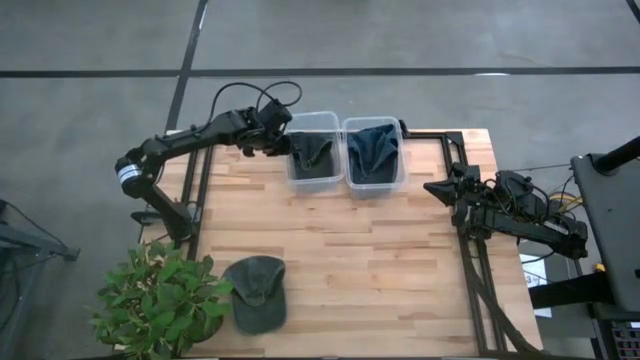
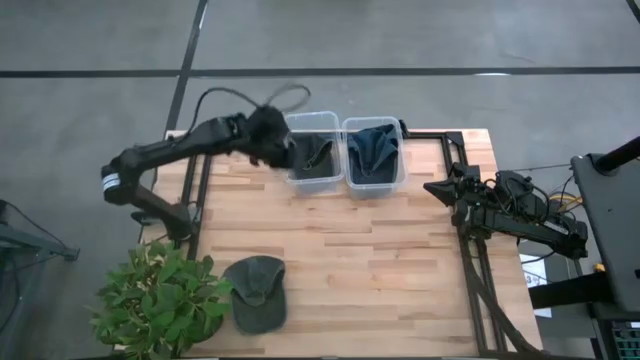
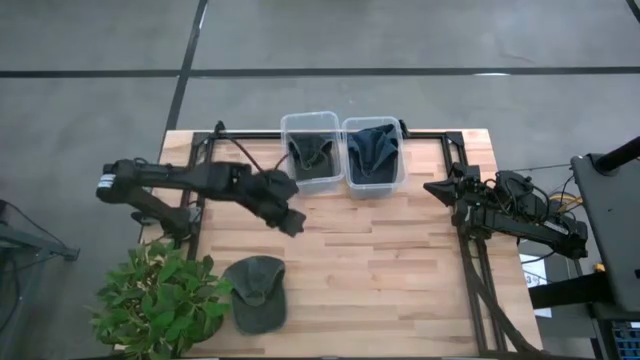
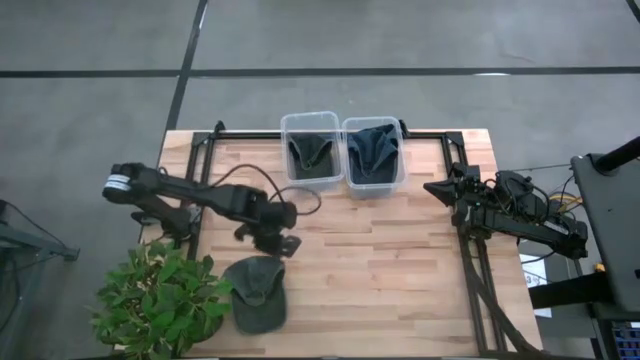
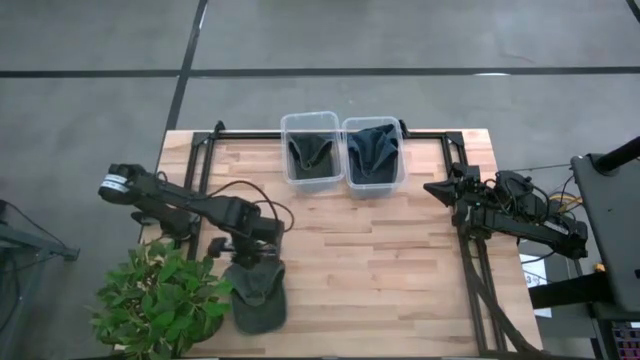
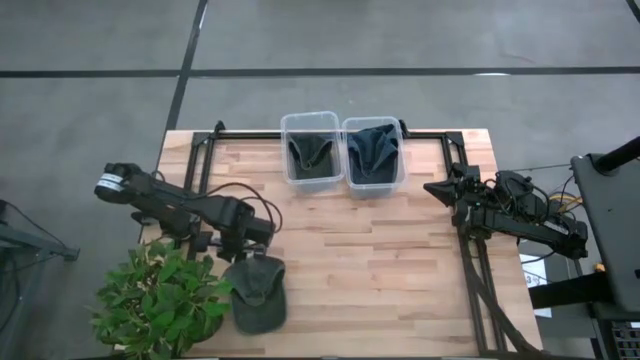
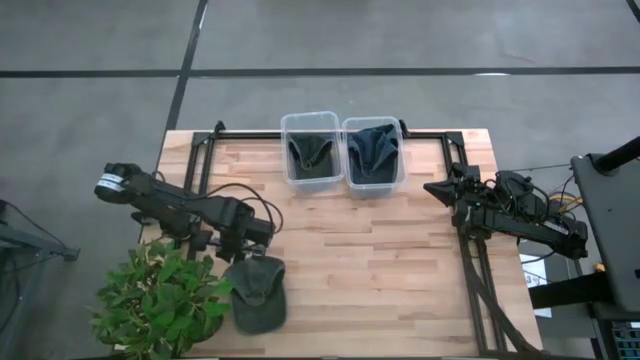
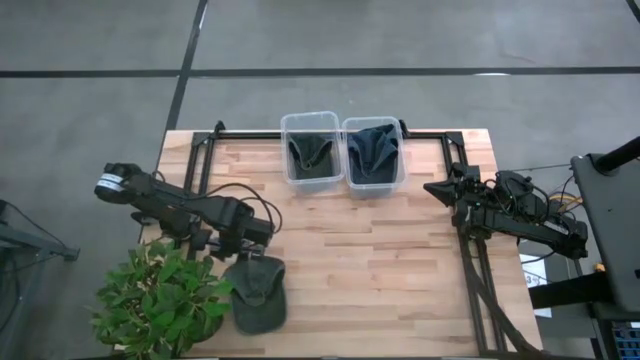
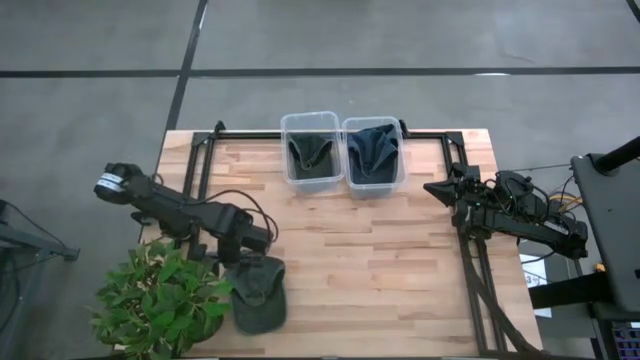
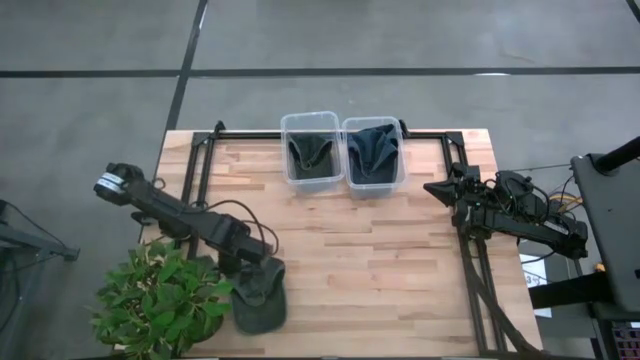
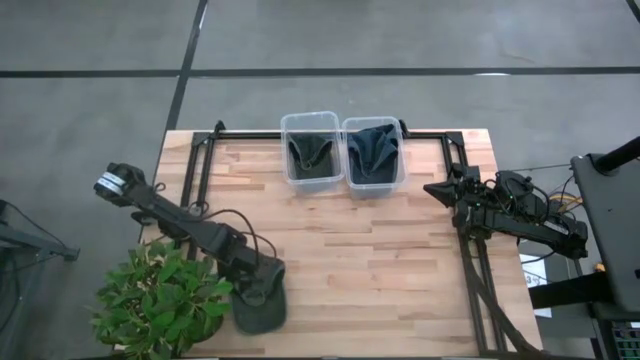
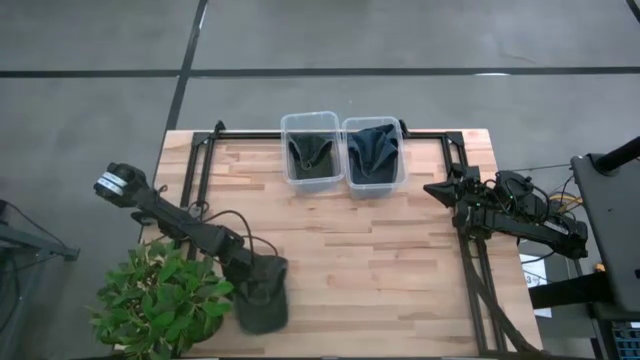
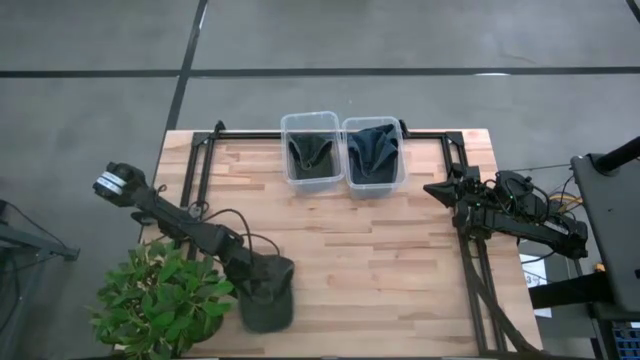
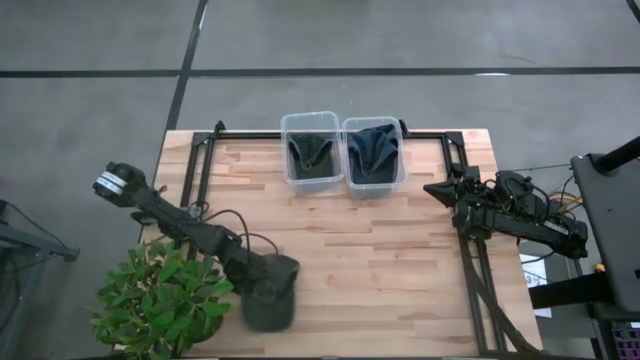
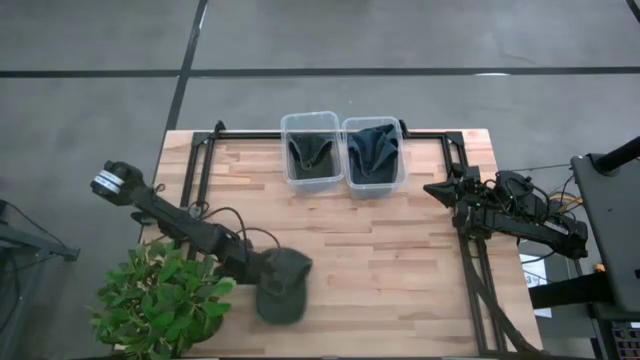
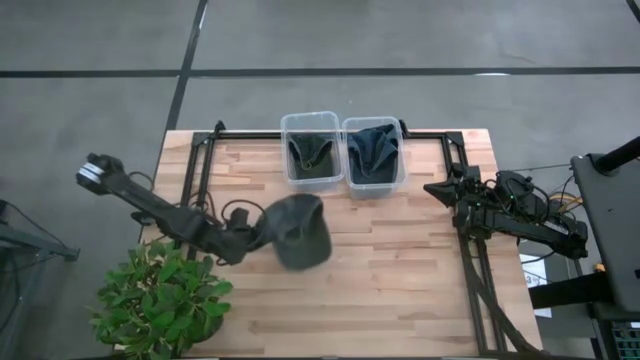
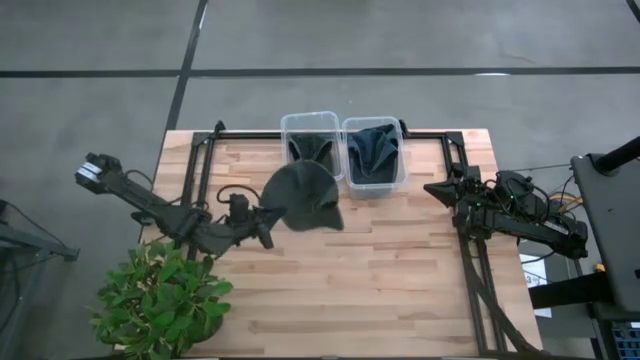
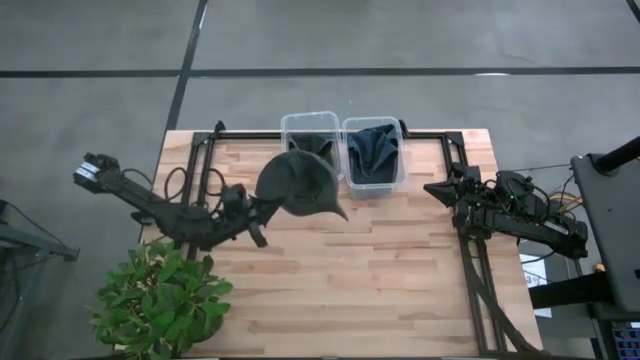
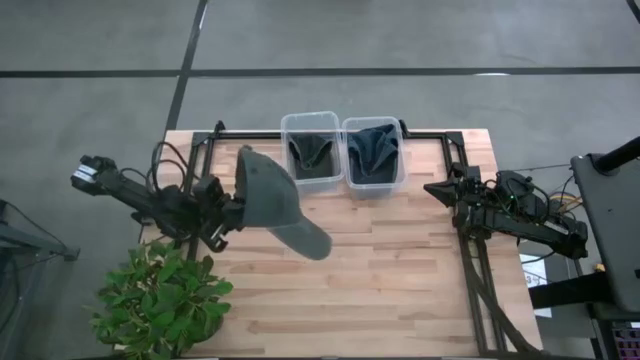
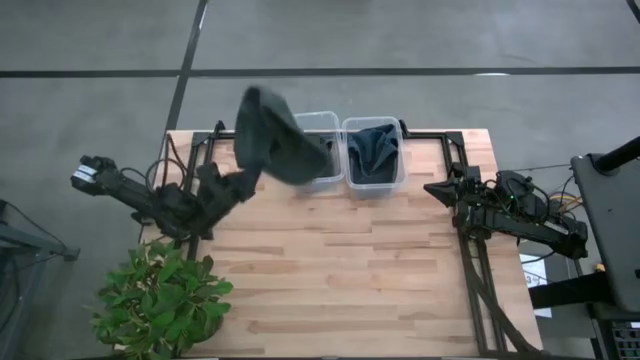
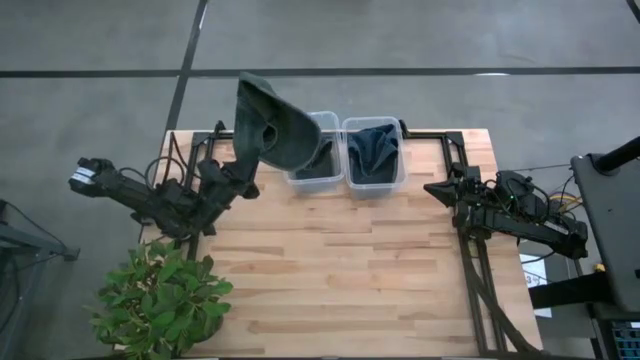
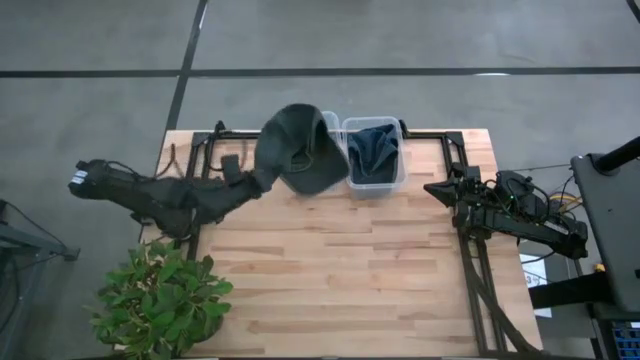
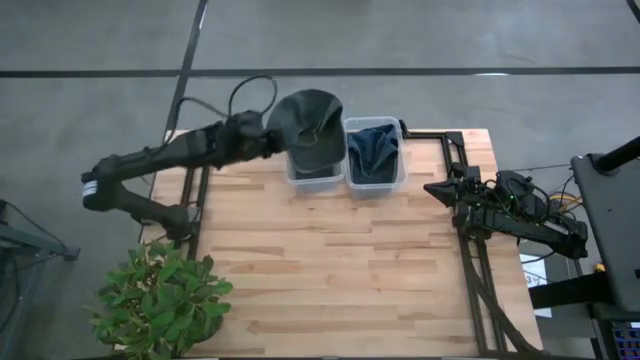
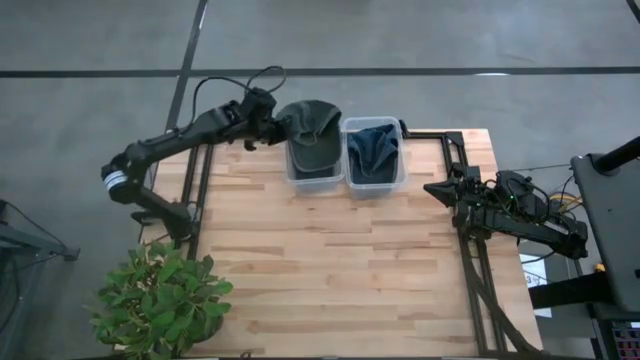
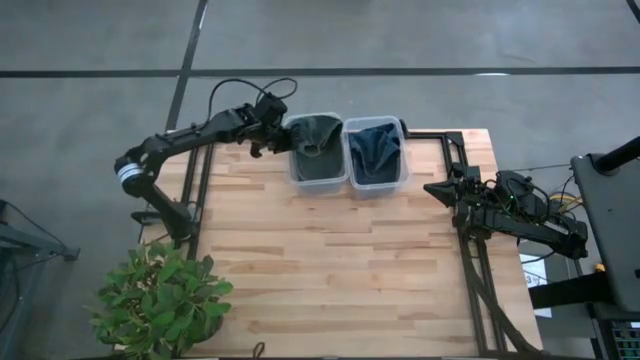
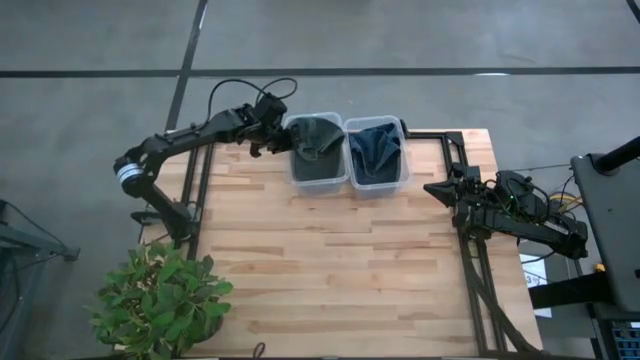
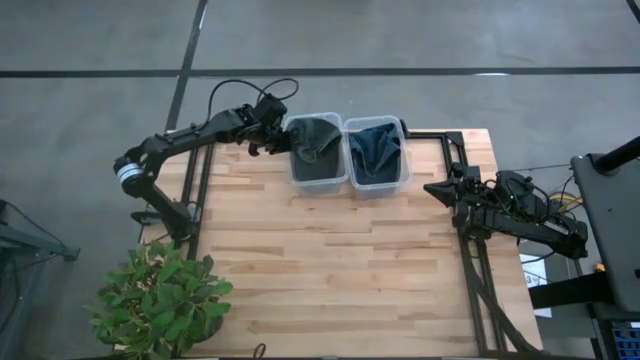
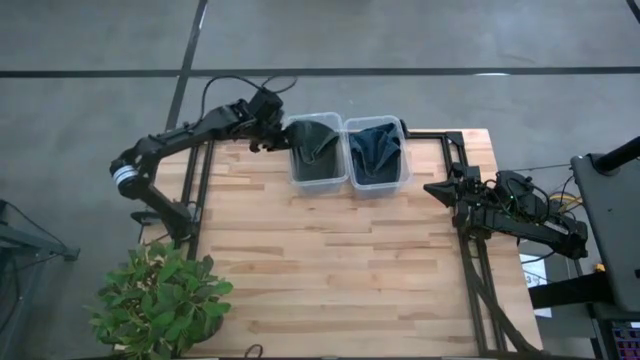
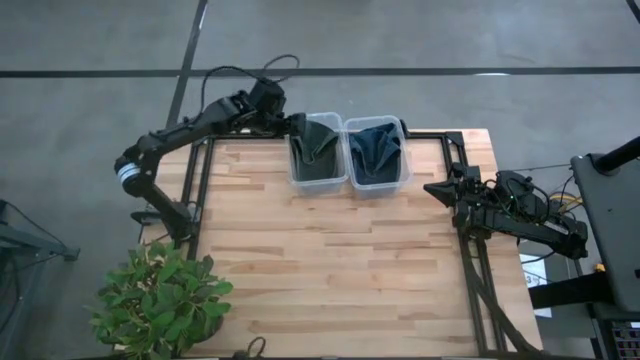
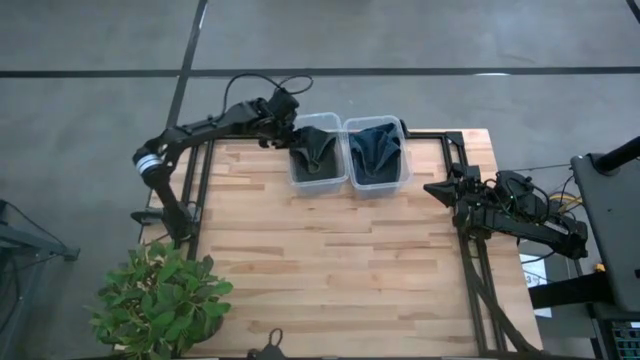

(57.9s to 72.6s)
Task: Pick & Place hat
Put the black cap into the left transparent bin

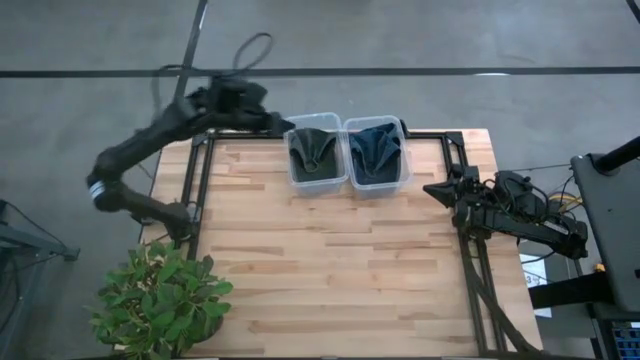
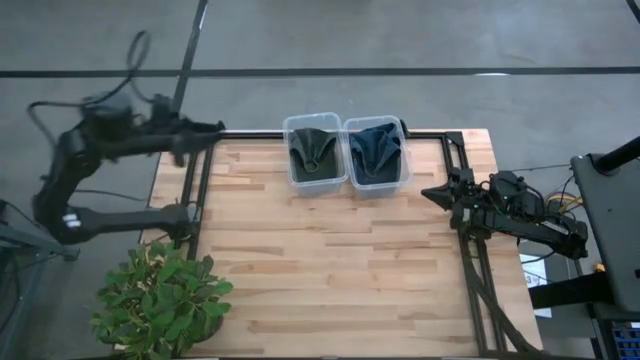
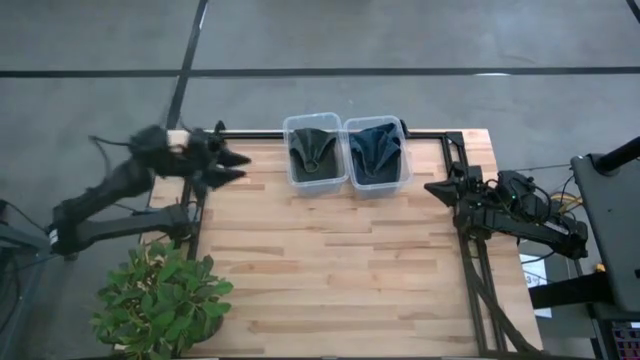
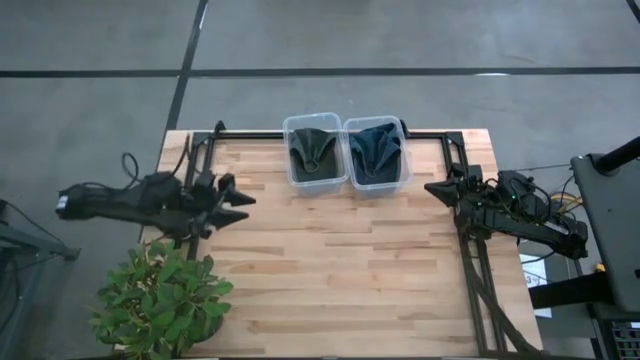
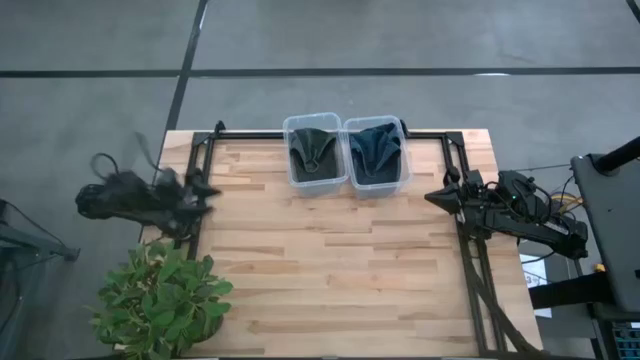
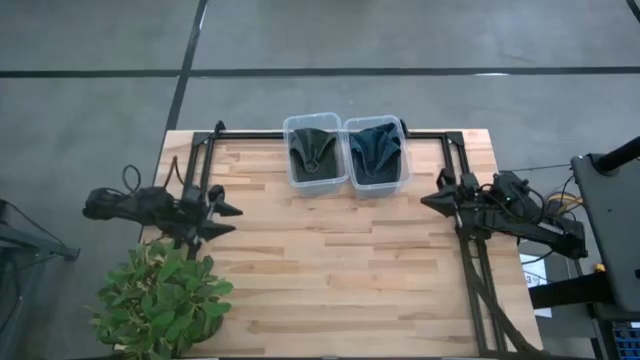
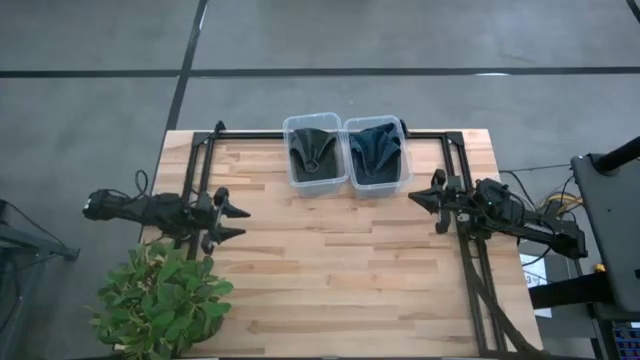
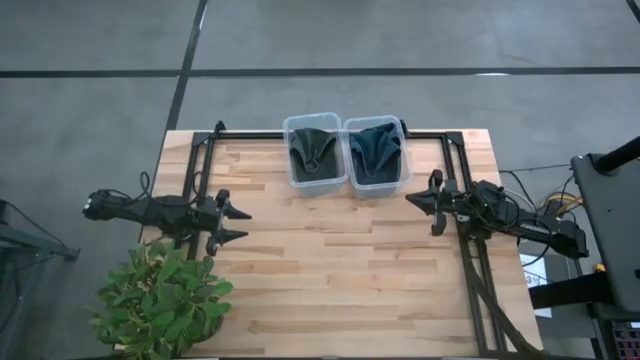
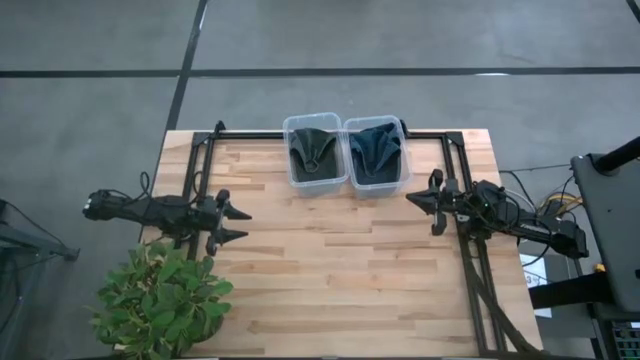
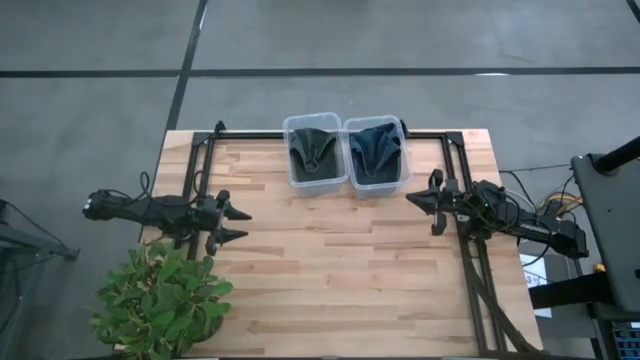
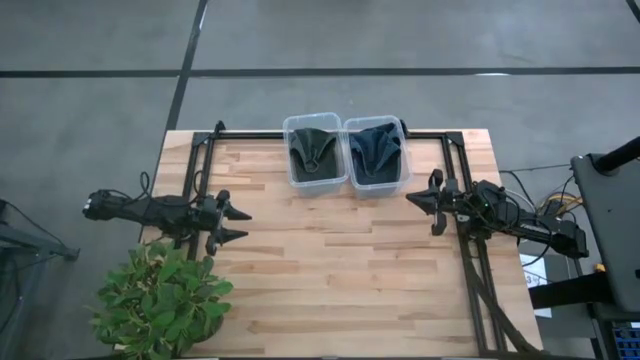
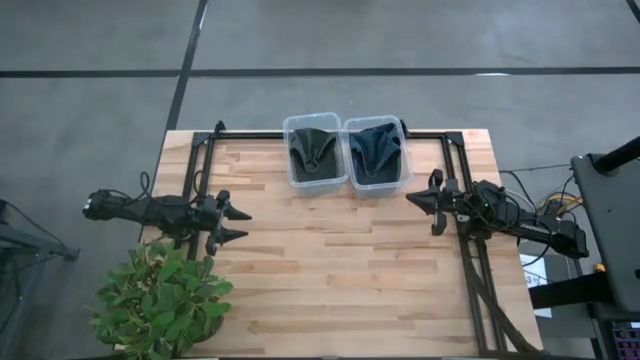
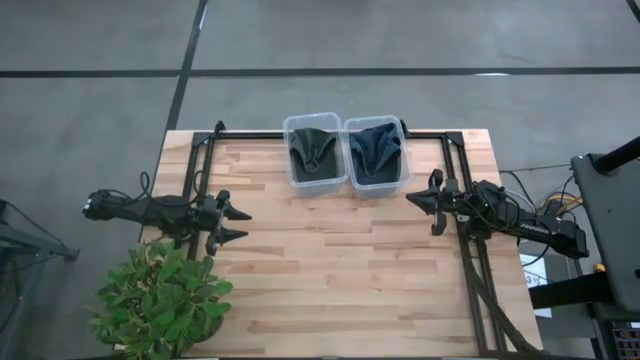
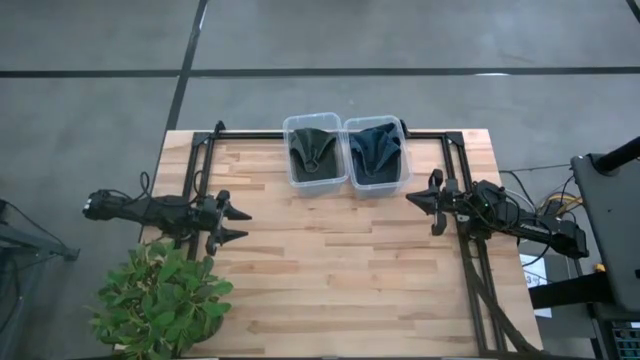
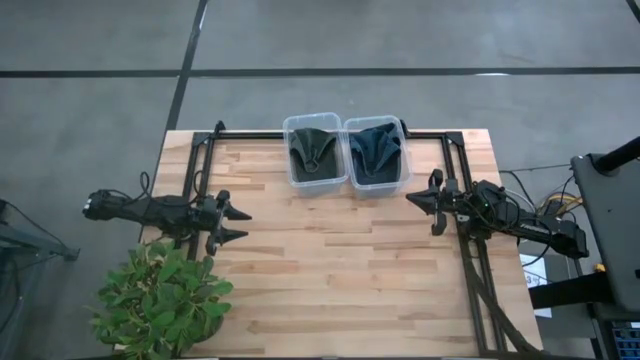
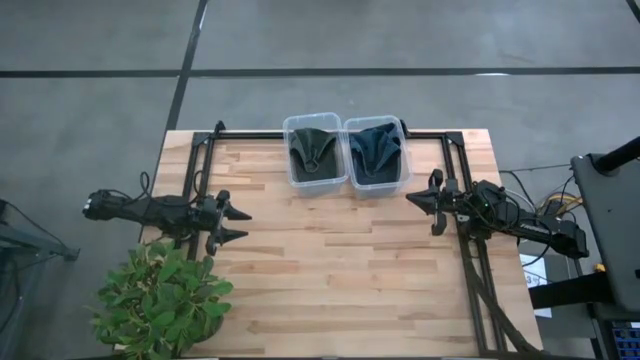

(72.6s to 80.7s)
Return to Home Position
